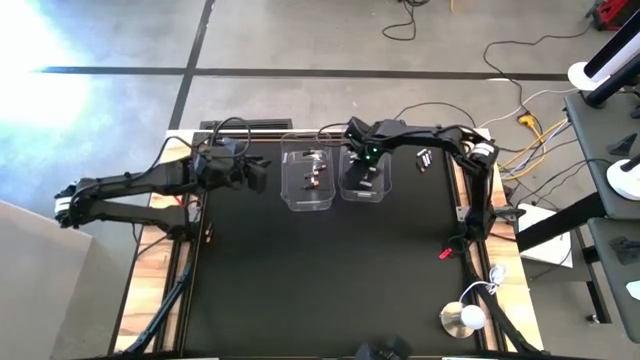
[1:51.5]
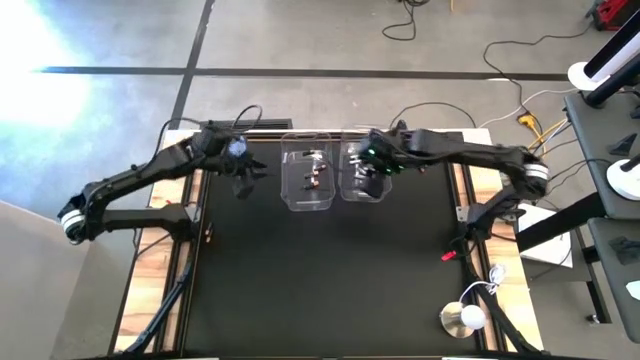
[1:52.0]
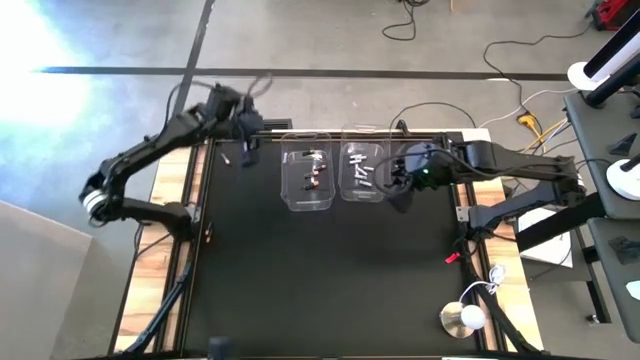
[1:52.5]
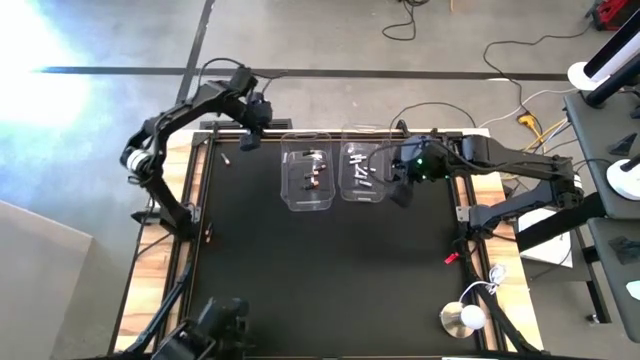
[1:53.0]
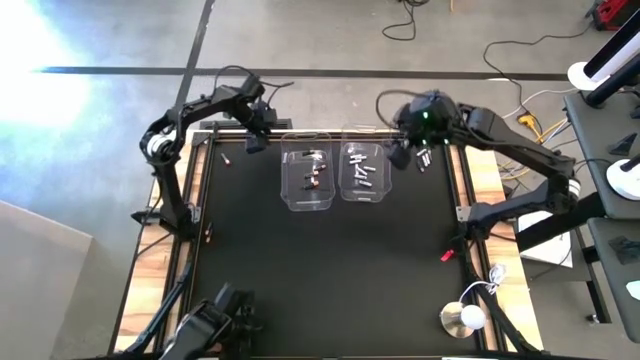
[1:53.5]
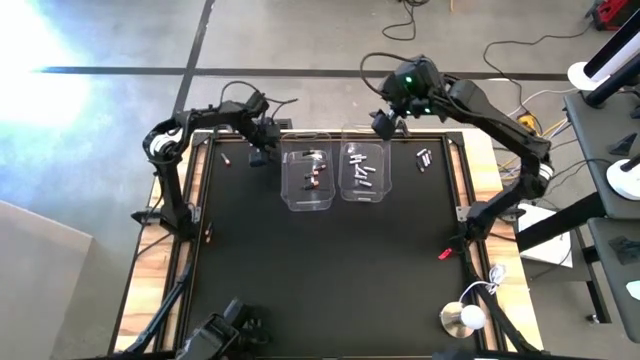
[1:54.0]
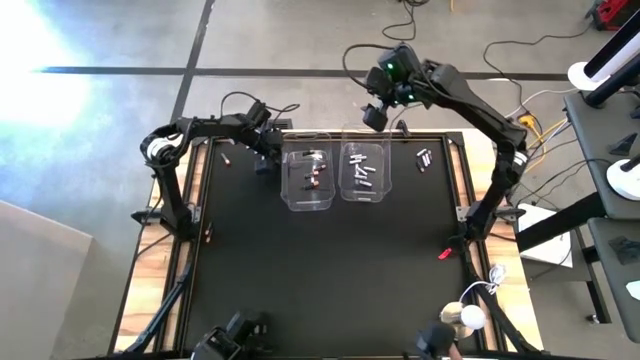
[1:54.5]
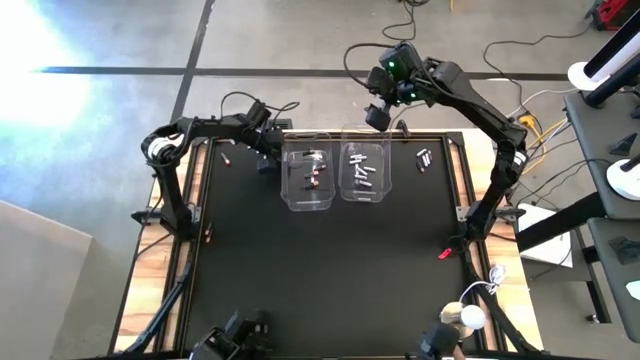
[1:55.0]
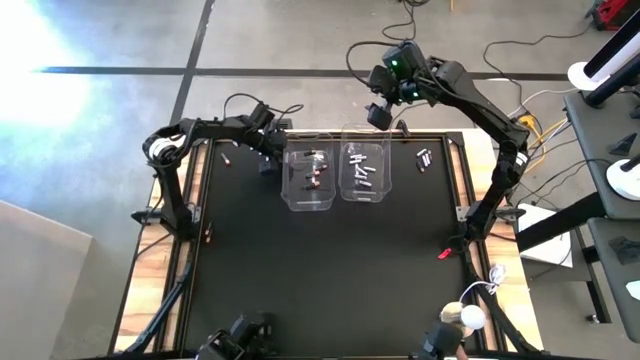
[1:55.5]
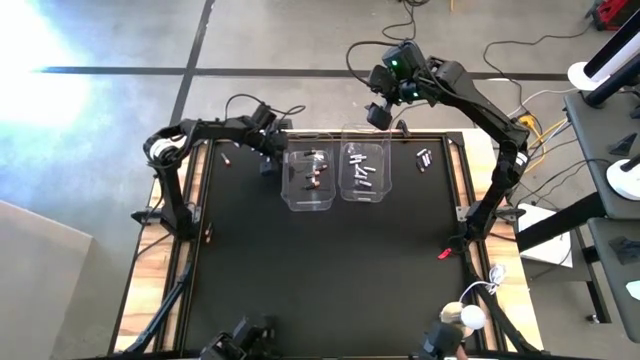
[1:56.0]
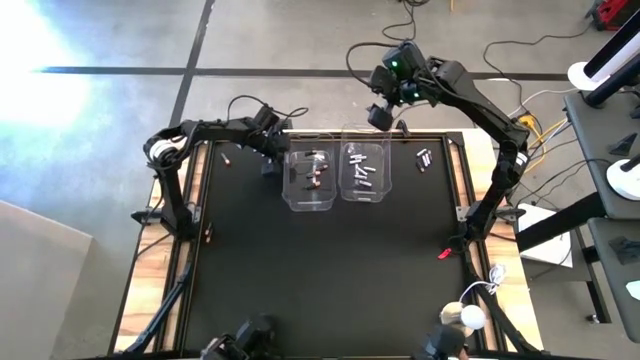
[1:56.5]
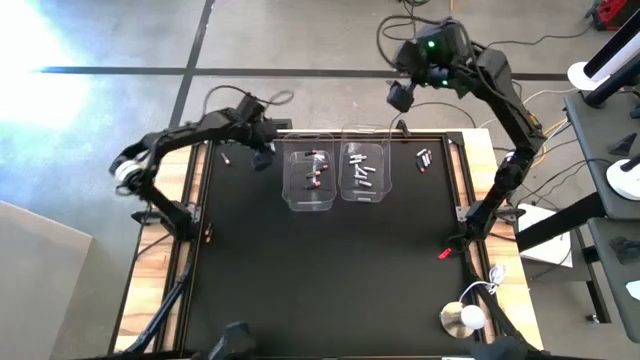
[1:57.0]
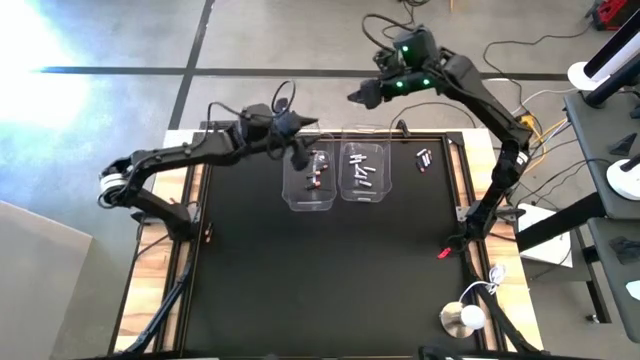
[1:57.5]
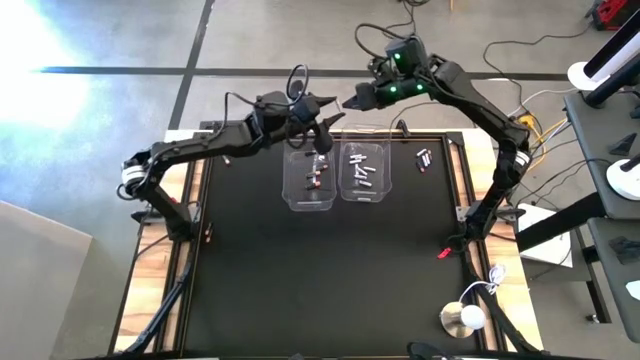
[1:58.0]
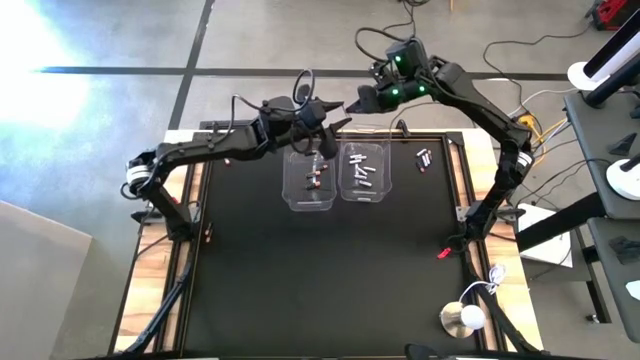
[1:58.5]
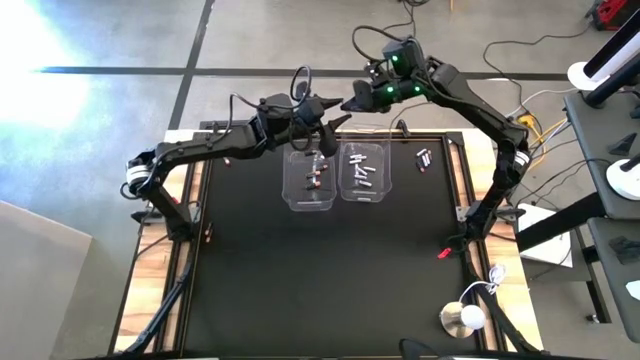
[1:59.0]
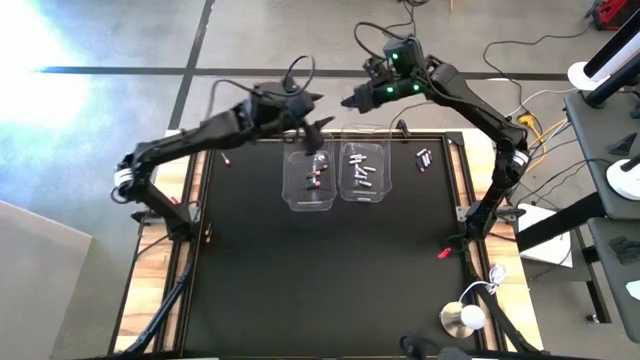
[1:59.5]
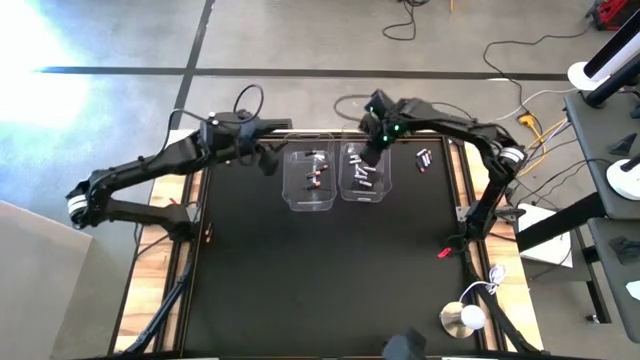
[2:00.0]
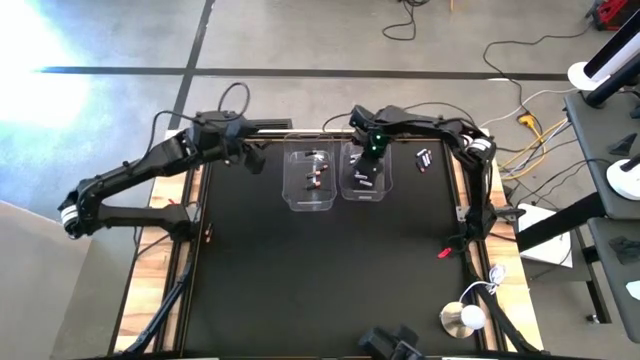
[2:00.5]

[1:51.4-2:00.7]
Task: Sort batteries
Put the white battery into the right transparent bin

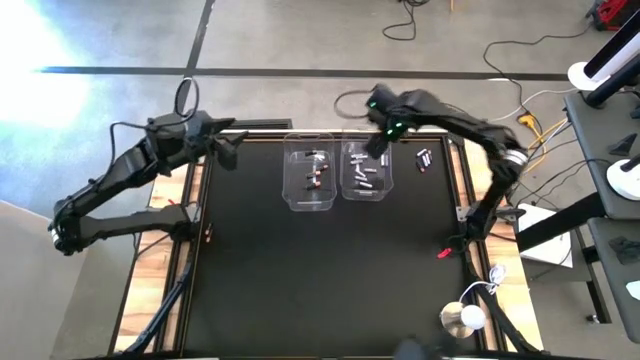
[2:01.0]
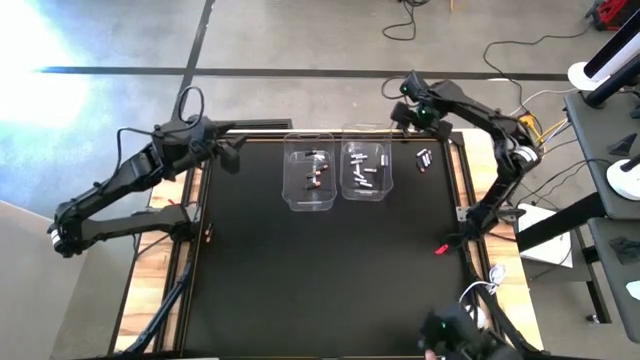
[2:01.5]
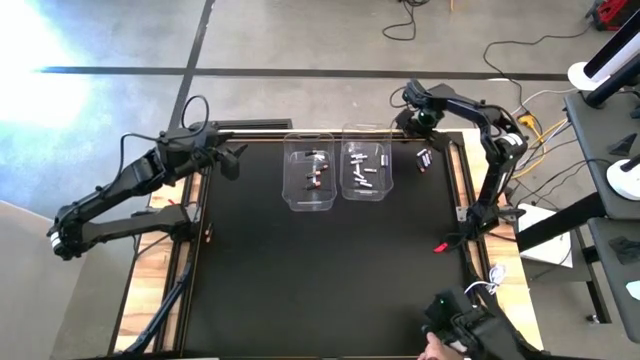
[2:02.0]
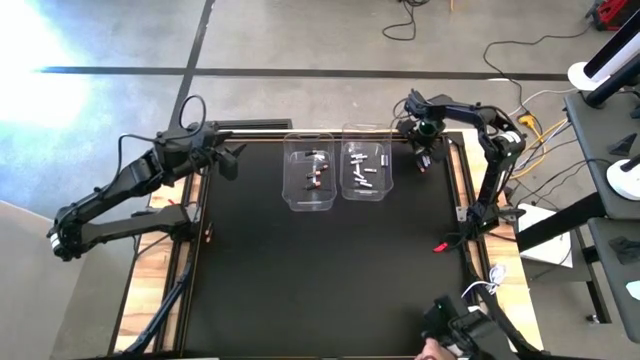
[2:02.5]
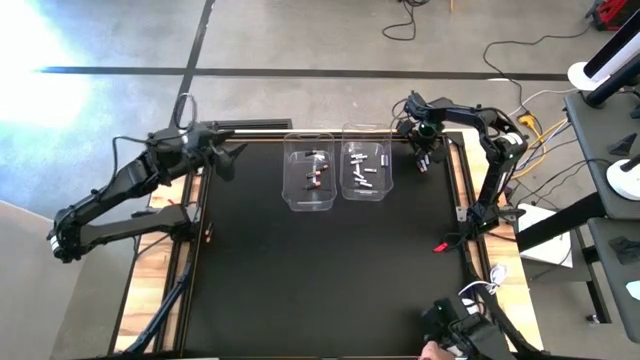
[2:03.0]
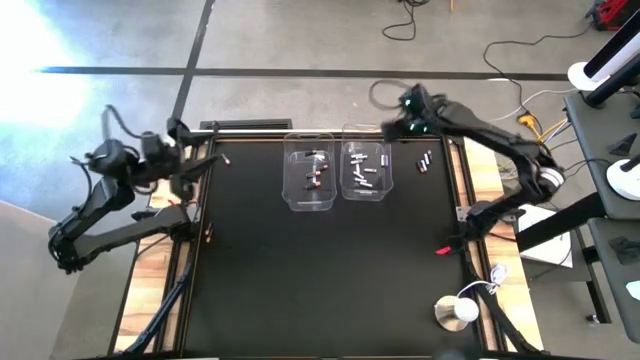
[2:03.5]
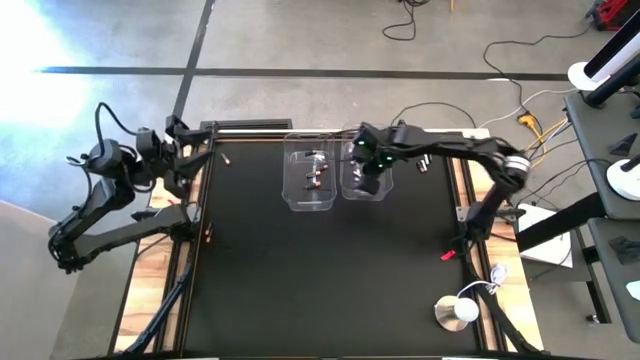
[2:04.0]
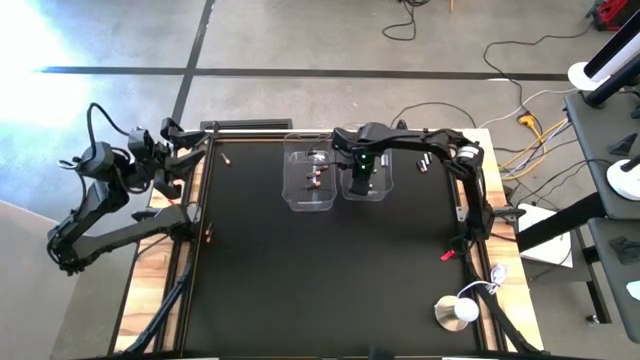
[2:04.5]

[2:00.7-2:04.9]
Put the white battery into the right transparent bin

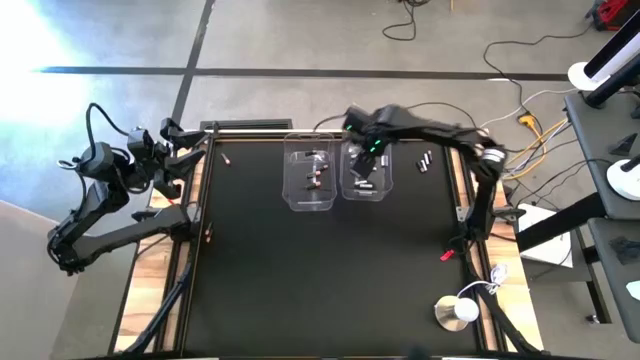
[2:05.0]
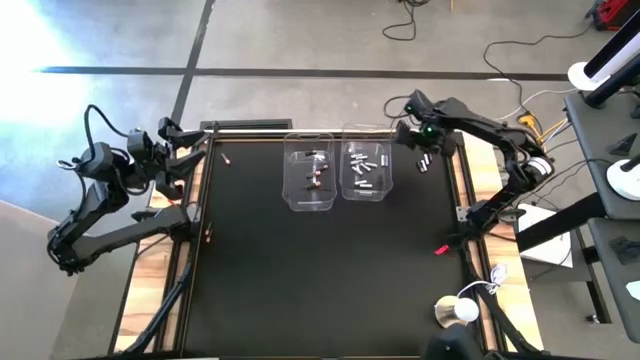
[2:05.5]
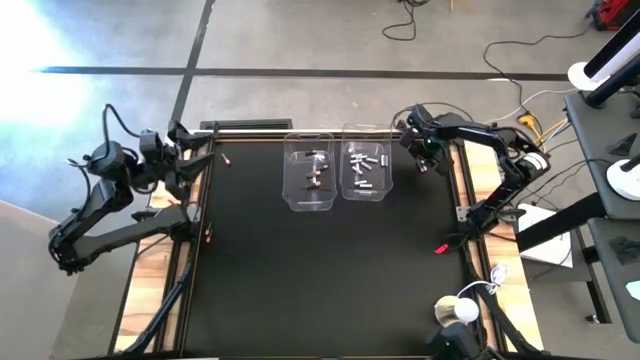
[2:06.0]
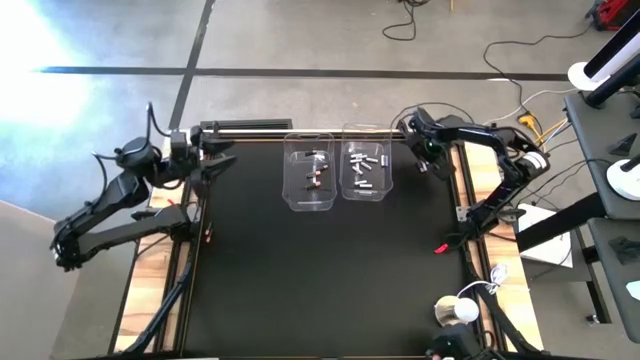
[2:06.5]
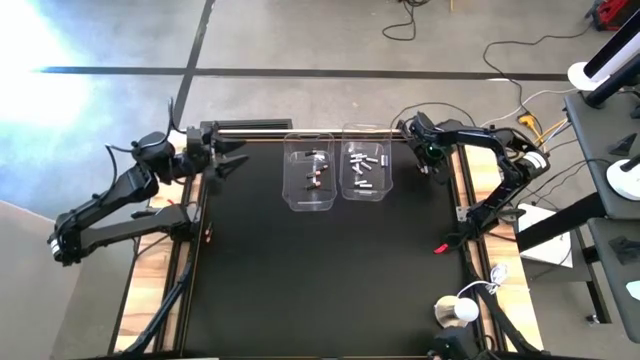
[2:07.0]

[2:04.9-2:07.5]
Put the white battery into the right transparent bin

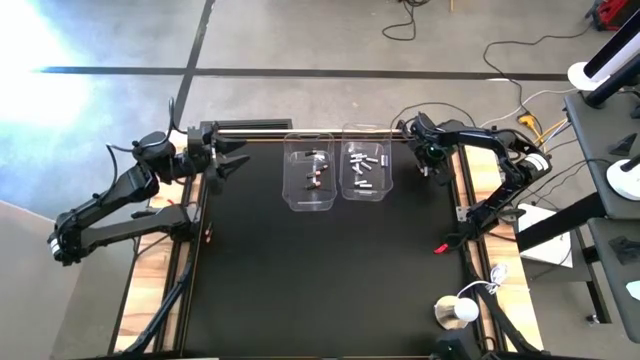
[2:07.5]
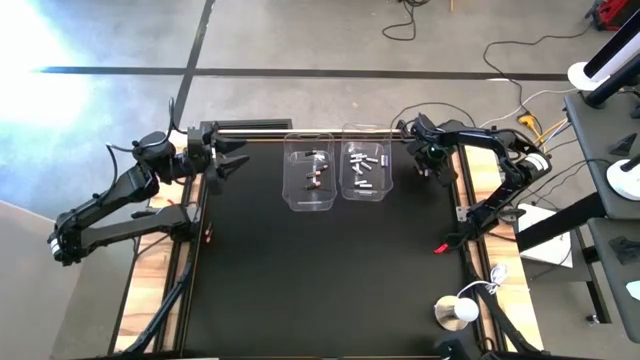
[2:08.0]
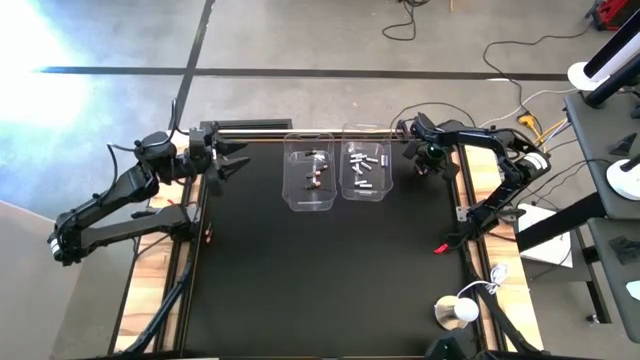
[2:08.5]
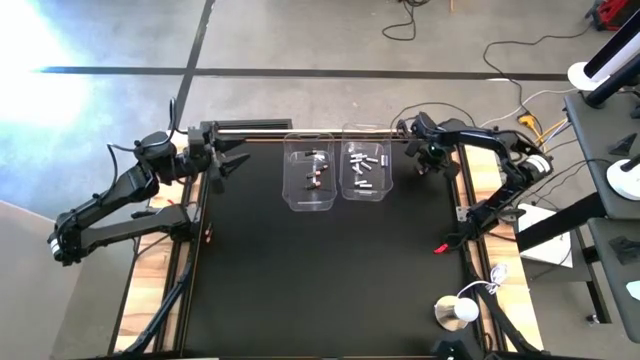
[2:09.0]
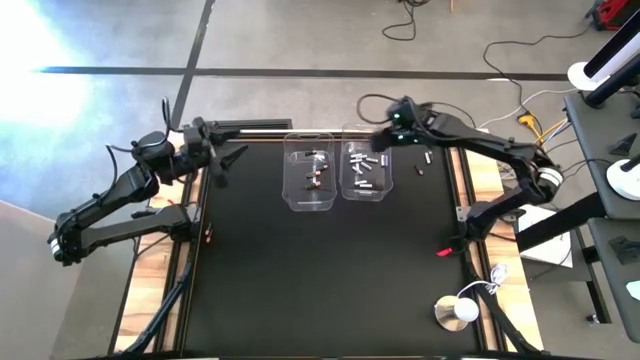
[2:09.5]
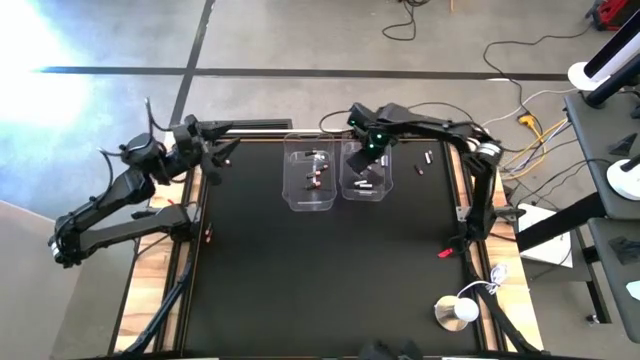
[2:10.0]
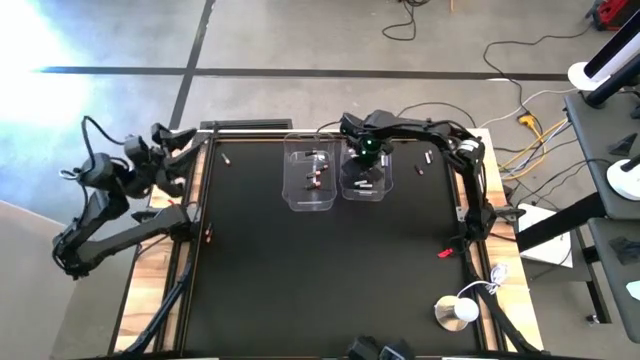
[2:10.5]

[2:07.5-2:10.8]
Put the white battery into the right transparent bin

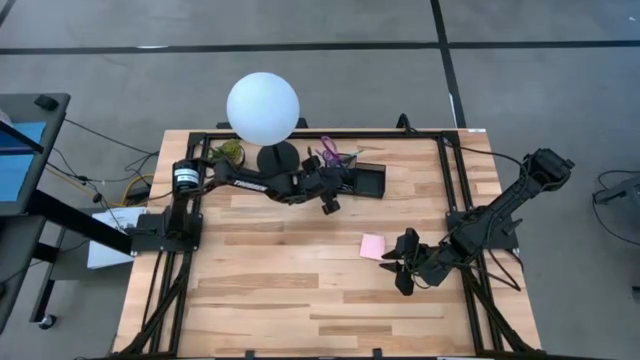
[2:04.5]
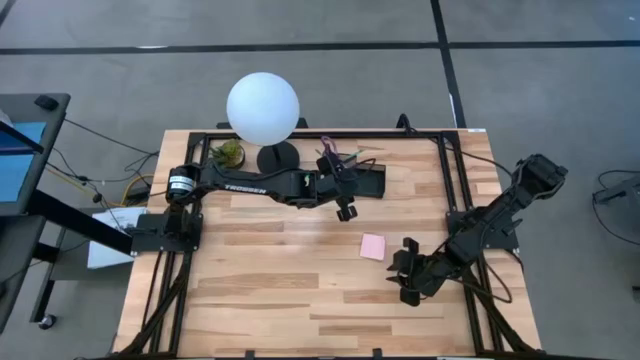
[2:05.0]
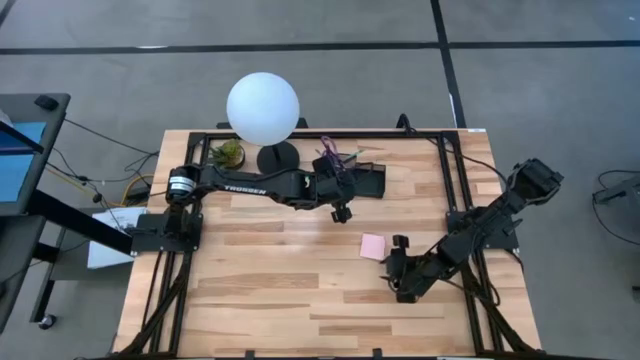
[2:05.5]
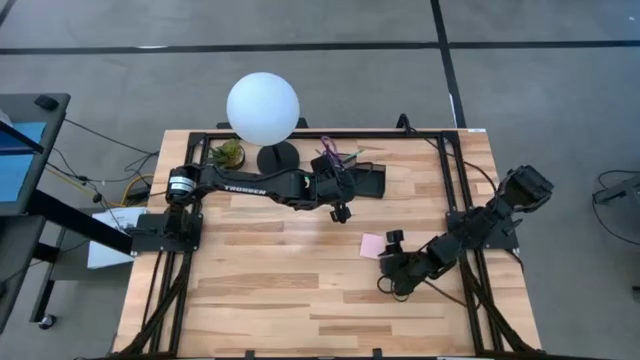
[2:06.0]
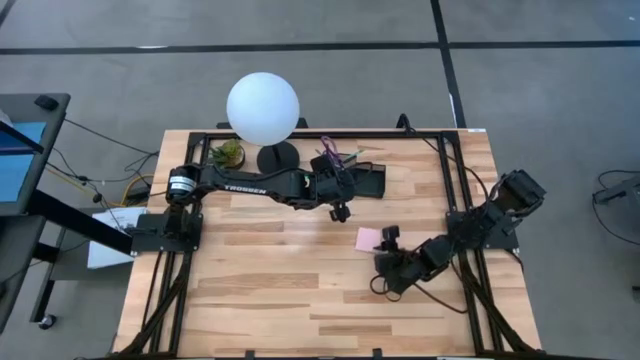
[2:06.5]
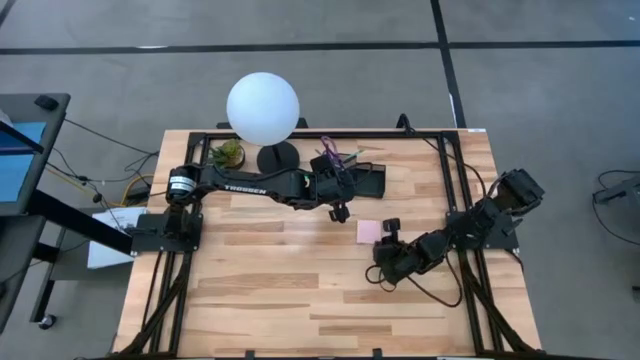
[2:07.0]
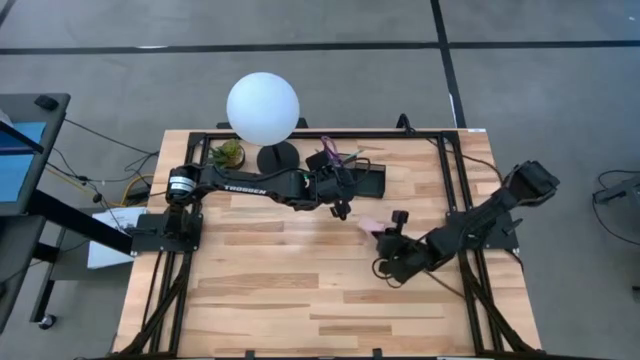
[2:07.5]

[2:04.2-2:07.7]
Task: Pick and place office supplies into organizer
Put the pink sticky notes into the black desk organizer
